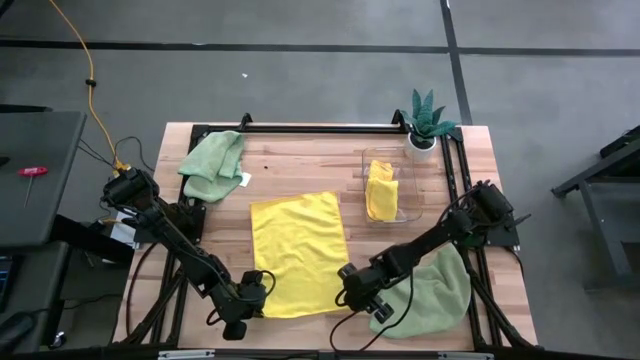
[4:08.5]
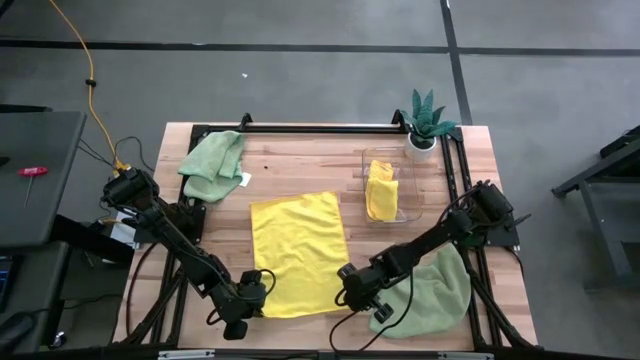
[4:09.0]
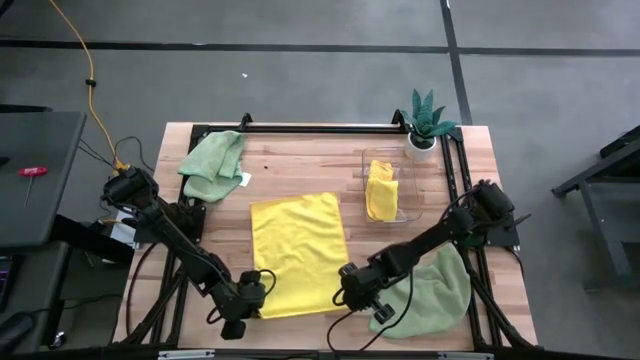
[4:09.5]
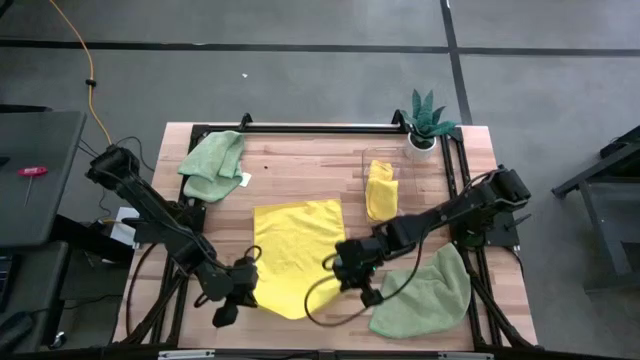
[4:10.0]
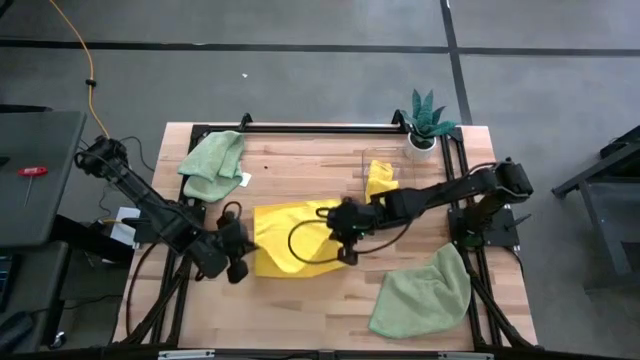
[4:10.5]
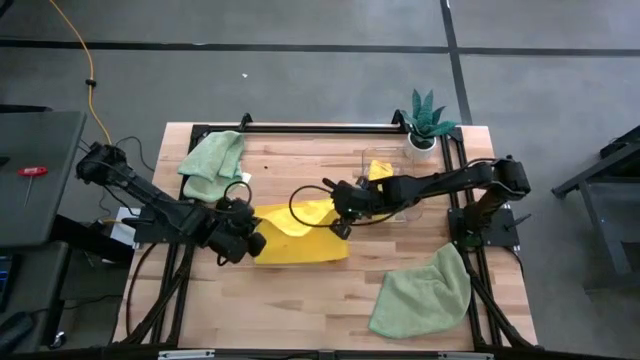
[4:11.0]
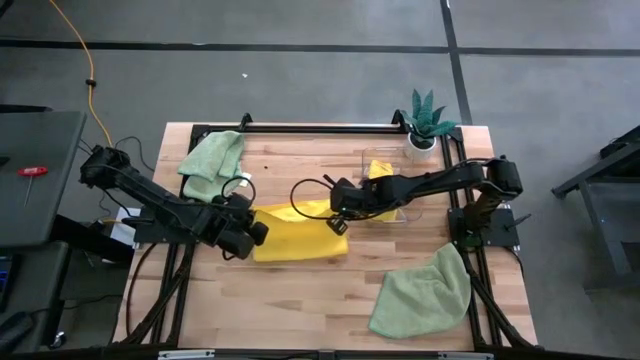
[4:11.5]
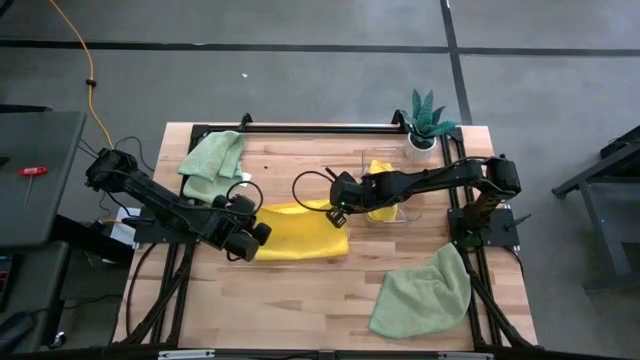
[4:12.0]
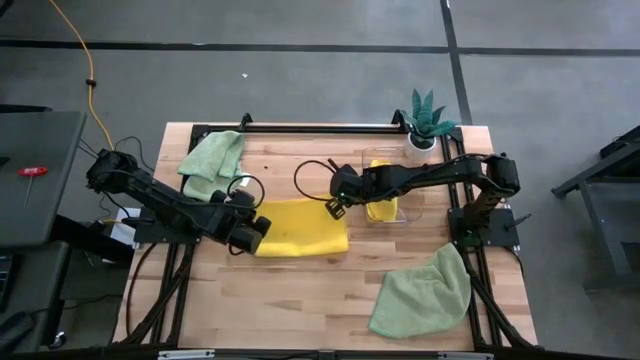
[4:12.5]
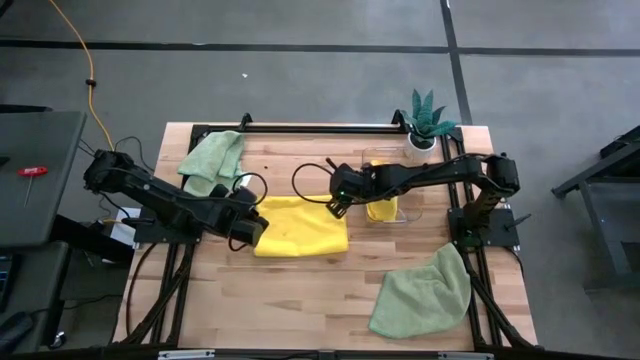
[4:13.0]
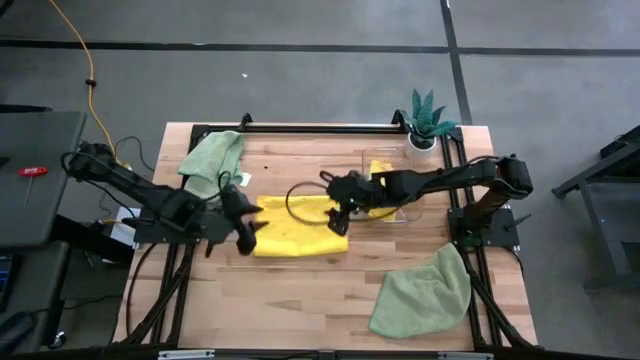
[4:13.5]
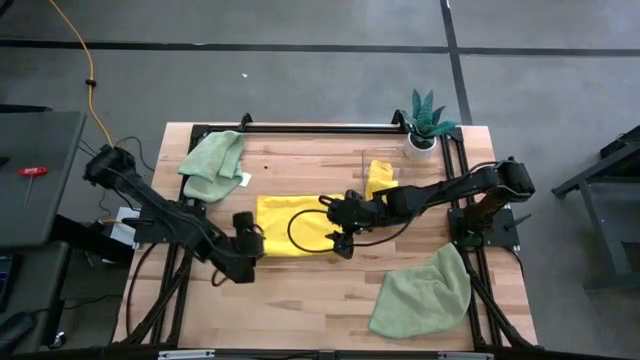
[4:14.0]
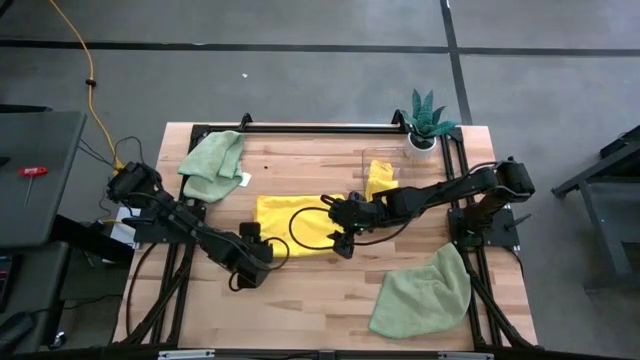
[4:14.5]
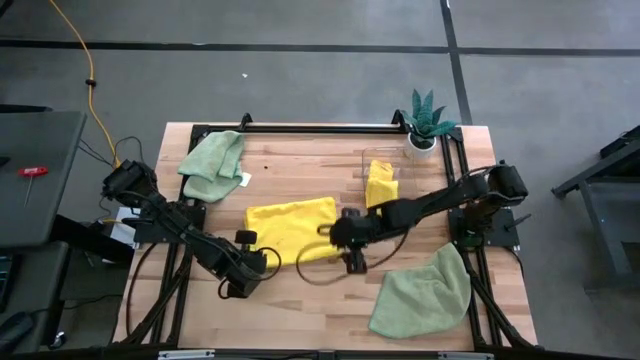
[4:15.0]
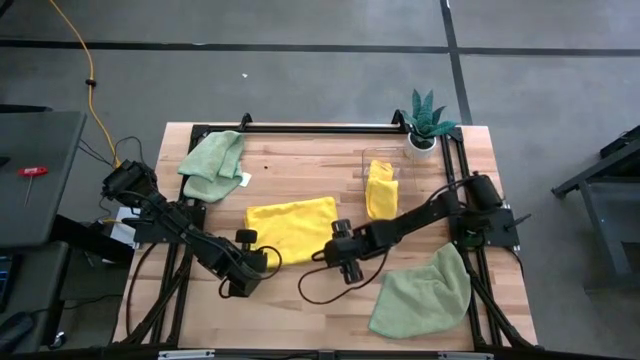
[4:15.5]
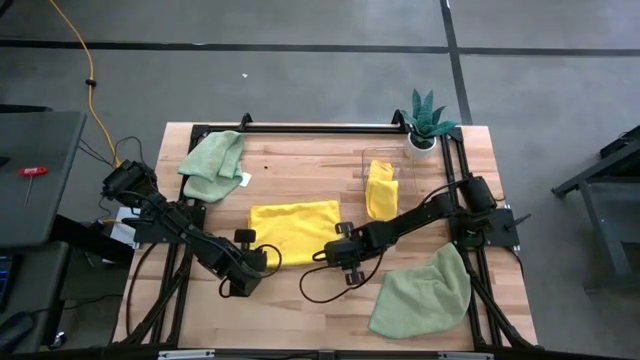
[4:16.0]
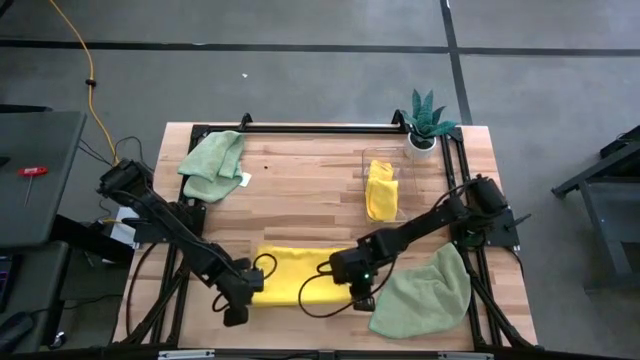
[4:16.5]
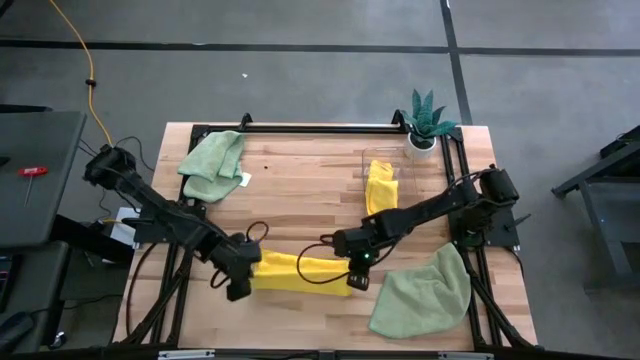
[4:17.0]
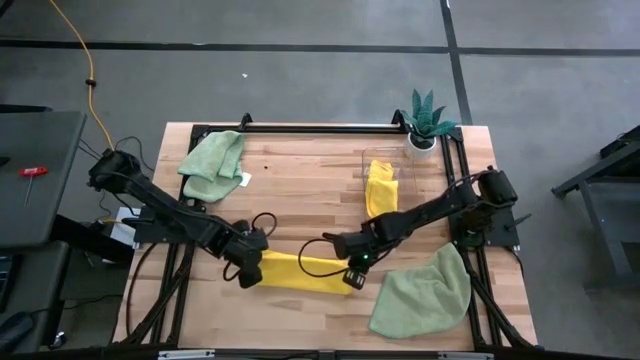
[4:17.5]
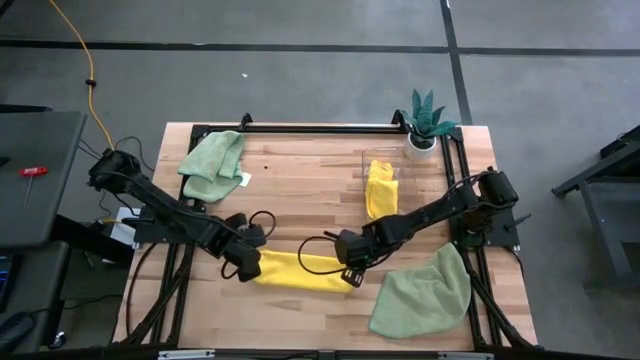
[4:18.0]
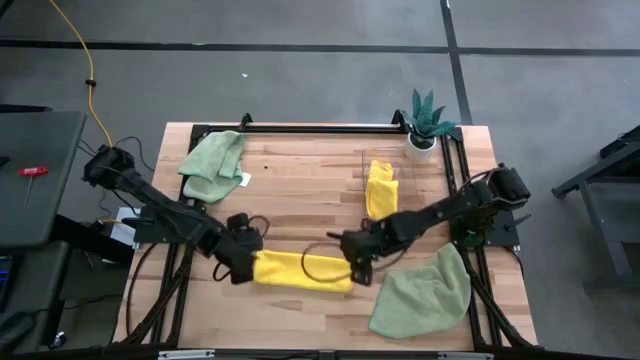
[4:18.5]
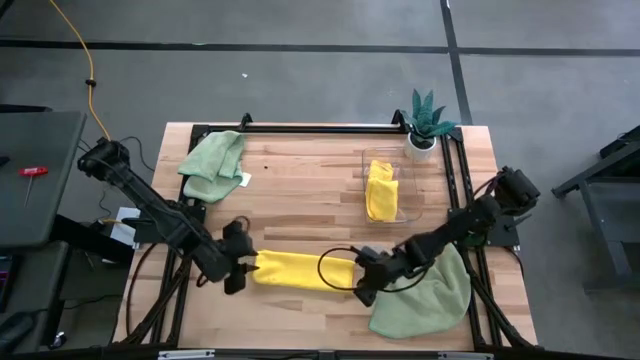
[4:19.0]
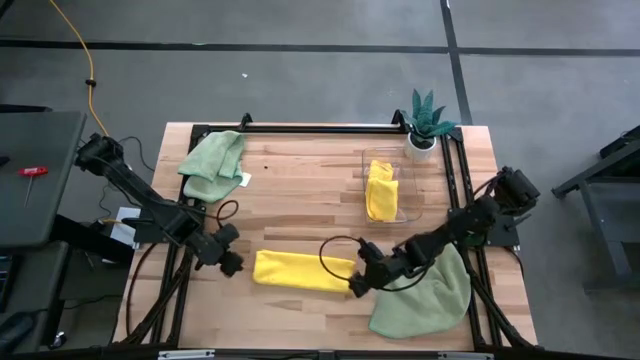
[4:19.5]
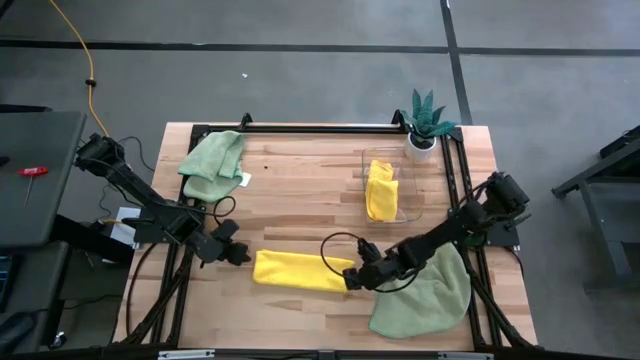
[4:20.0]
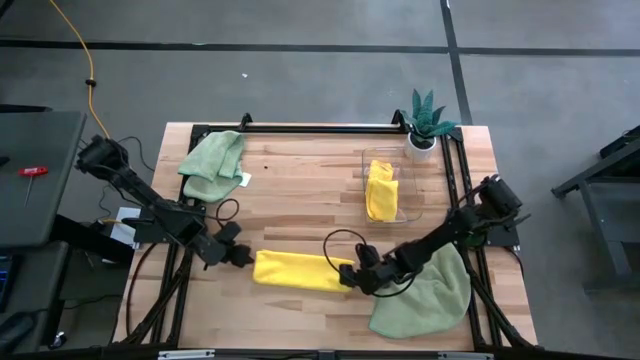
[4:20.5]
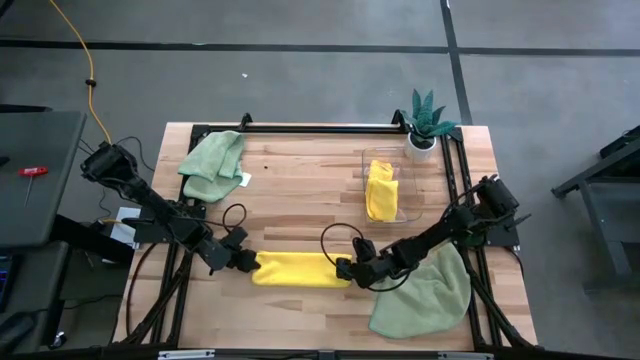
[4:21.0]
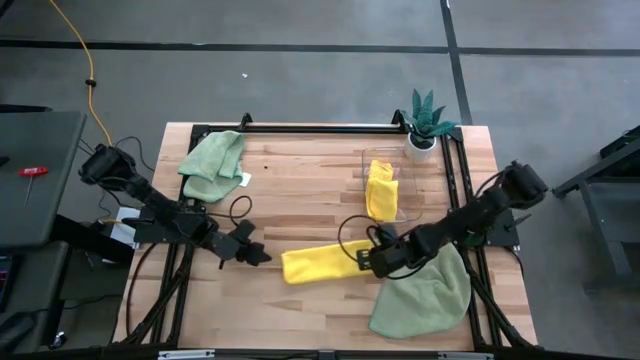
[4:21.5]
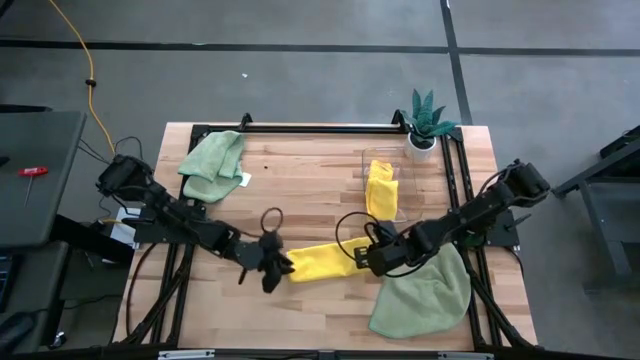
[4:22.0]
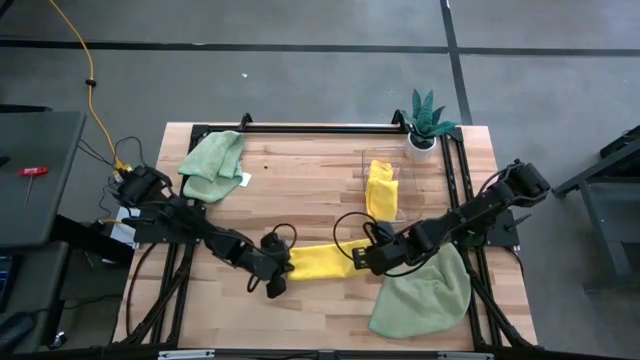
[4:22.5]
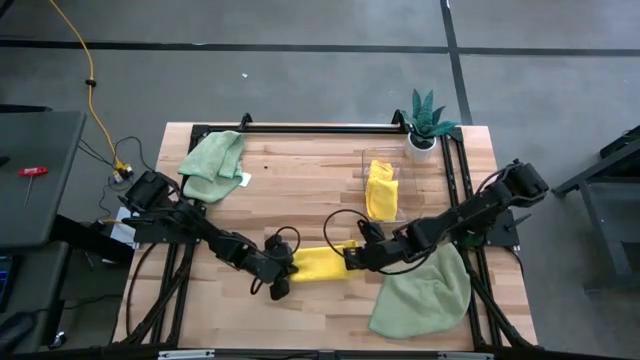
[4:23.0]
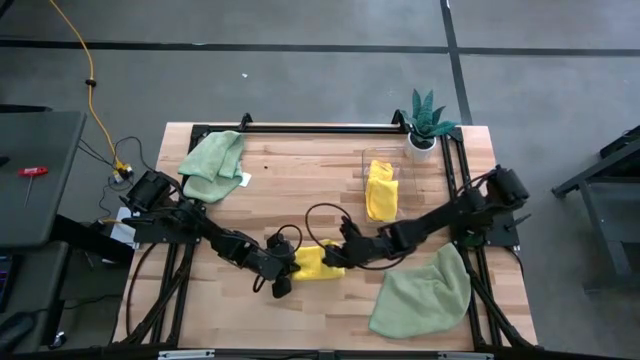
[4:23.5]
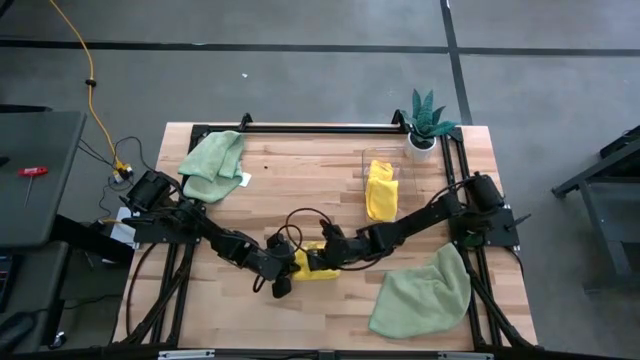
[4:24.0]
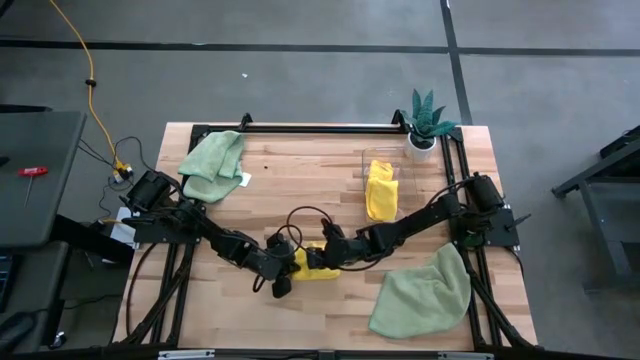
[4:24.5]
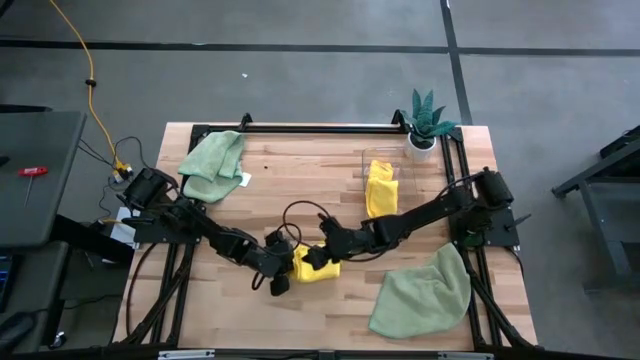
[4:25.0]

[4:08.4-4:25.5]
Task: Fold microfiber towels
Fold the yellow microfiber towel

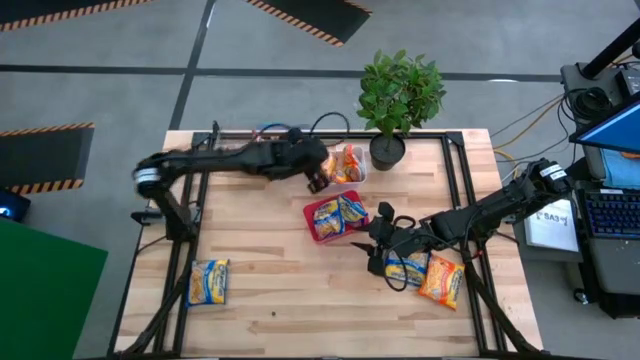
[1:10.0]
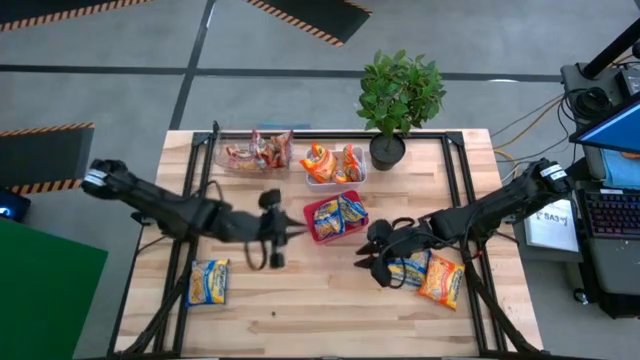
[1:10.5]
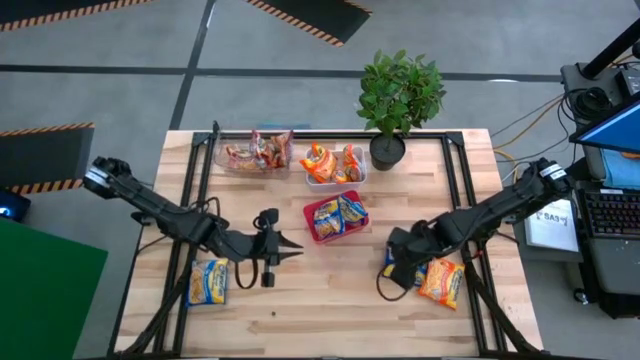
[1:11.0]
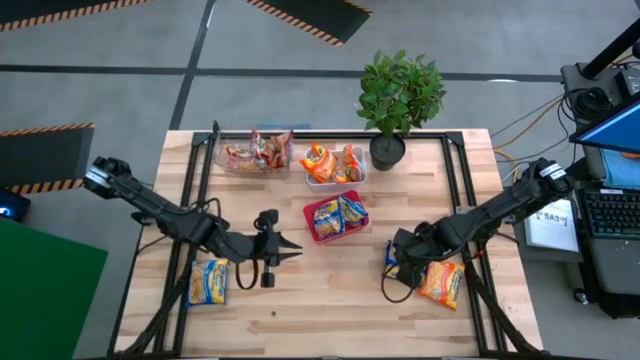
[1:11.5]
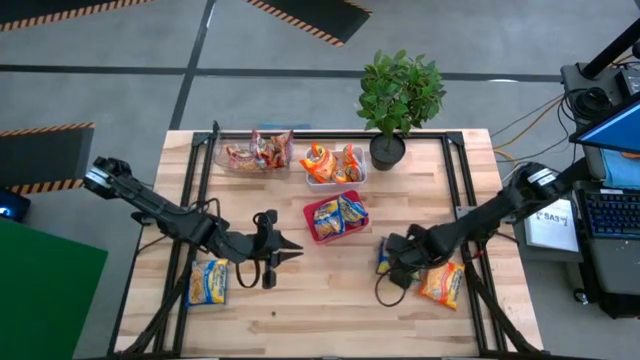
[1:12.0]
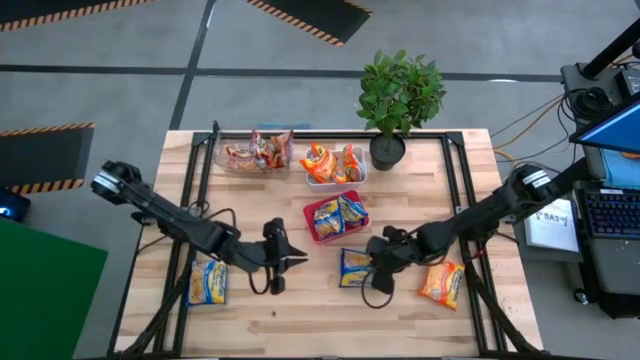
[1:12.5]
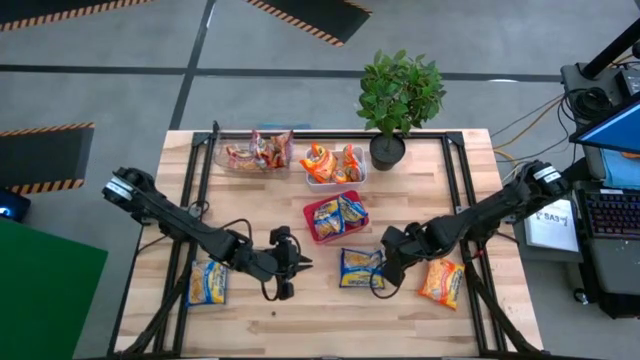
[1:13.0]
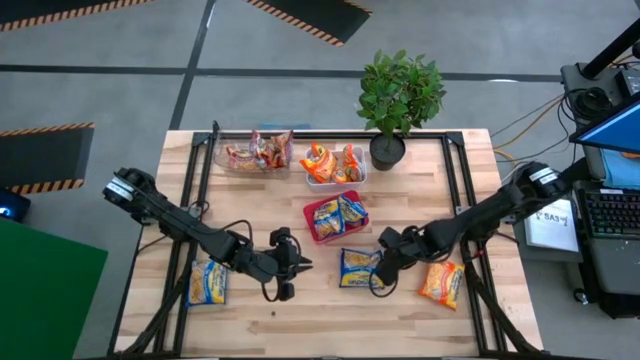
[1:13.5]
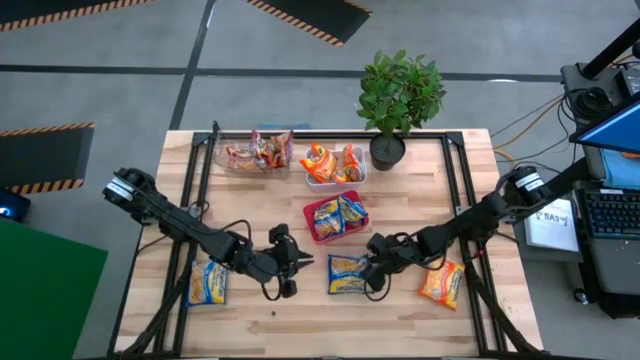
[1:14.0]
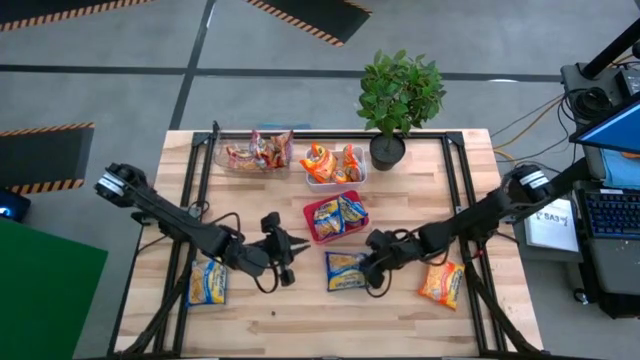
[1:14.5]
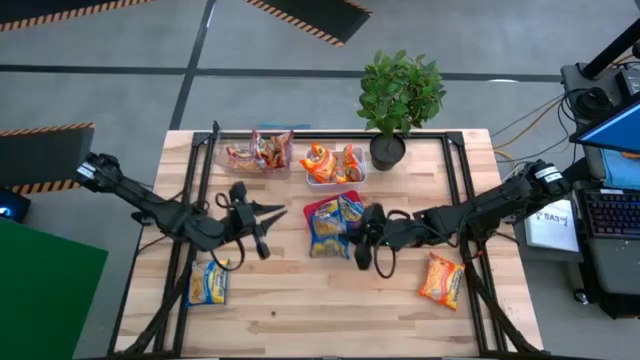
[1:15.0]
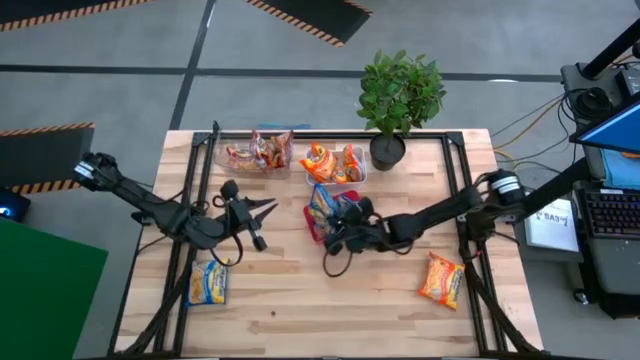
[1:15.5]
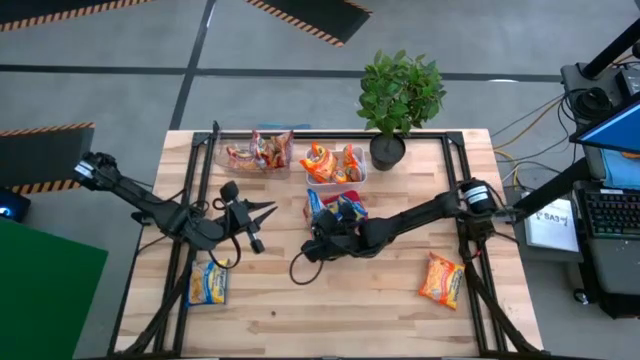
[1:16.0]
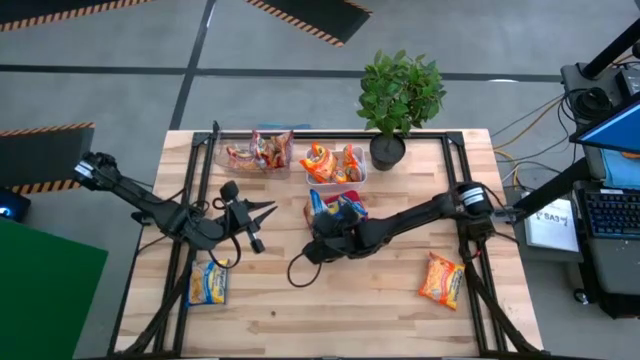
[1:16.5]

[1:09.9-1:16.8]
Task: Sort Maruchan noodles
Put the blue noodle pack into the red bin
